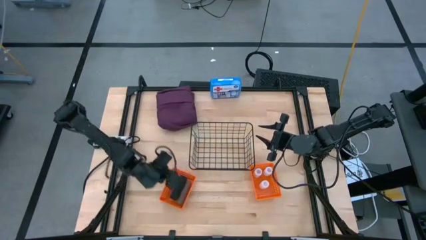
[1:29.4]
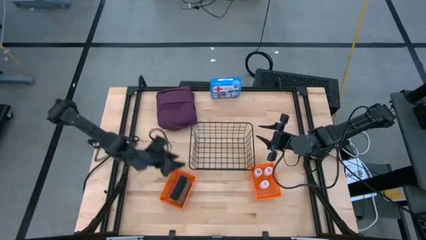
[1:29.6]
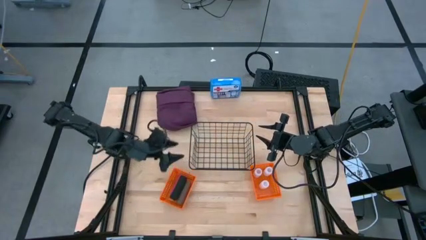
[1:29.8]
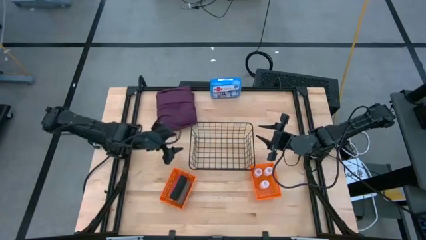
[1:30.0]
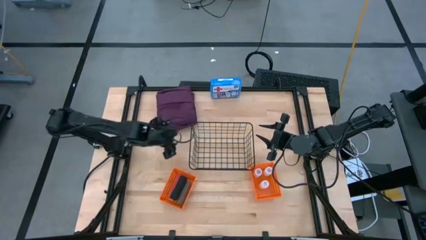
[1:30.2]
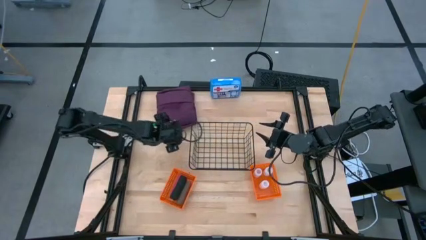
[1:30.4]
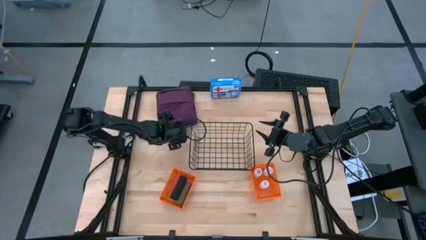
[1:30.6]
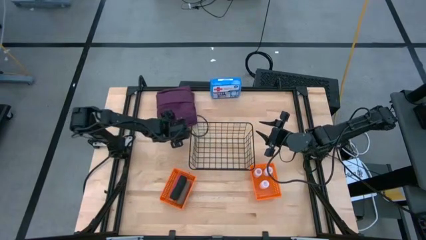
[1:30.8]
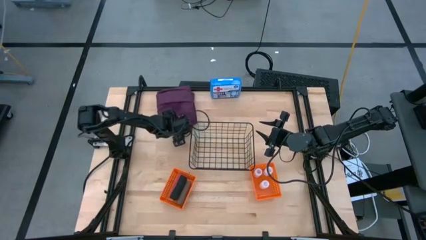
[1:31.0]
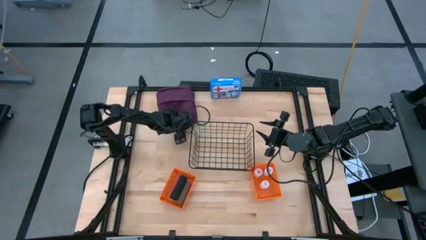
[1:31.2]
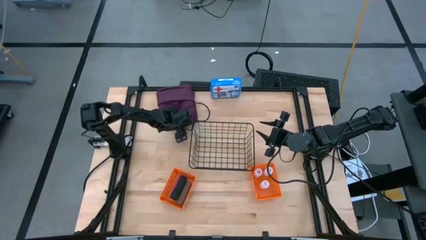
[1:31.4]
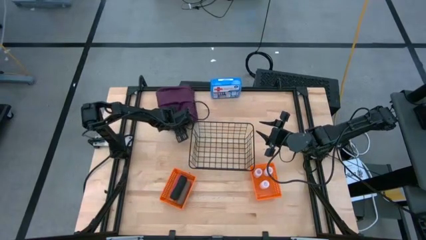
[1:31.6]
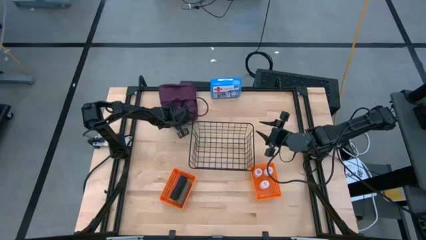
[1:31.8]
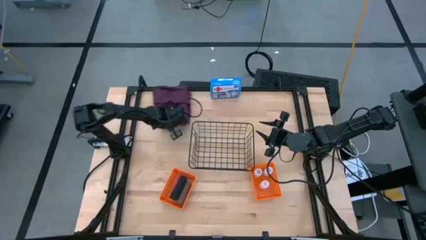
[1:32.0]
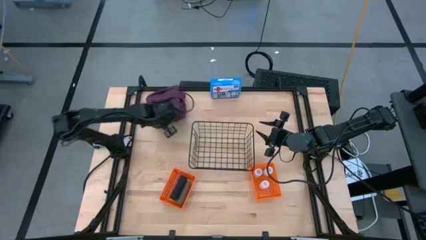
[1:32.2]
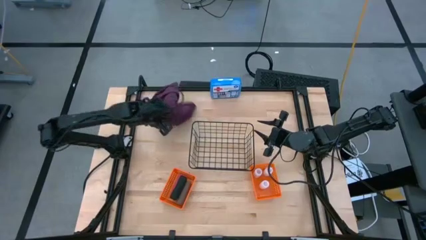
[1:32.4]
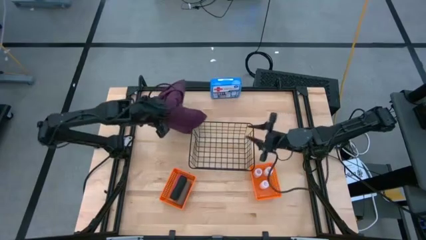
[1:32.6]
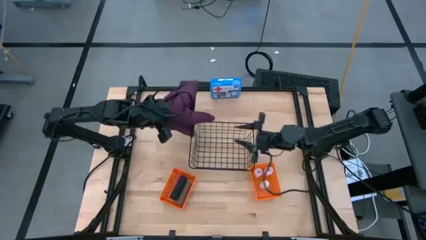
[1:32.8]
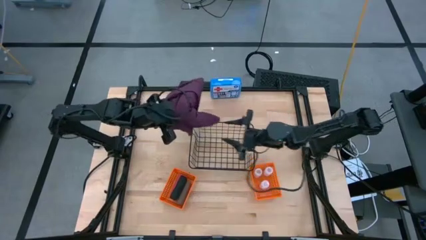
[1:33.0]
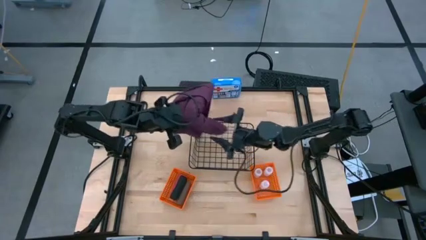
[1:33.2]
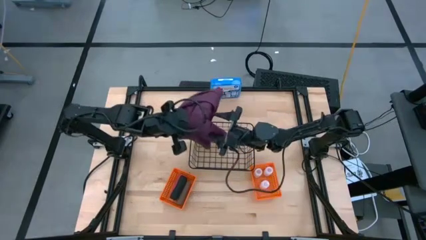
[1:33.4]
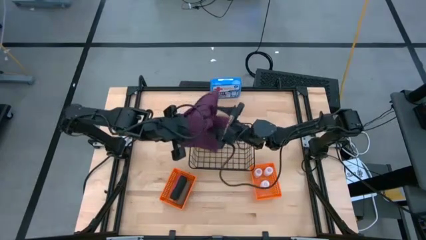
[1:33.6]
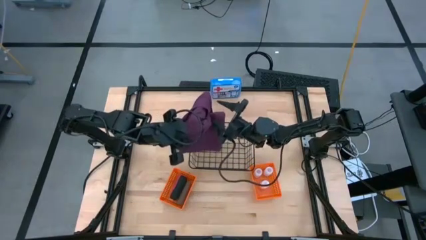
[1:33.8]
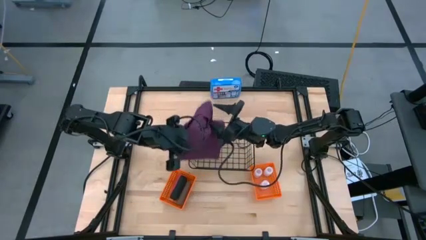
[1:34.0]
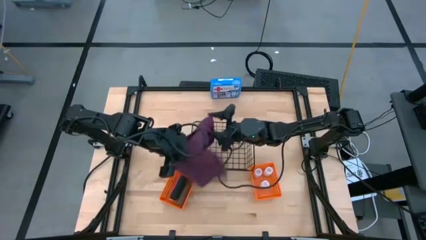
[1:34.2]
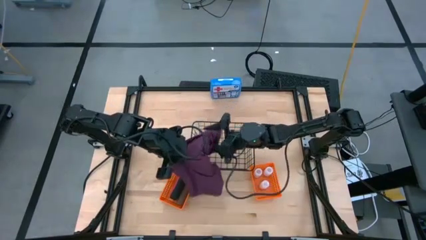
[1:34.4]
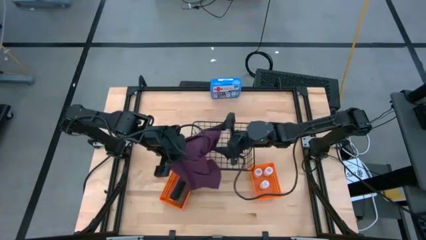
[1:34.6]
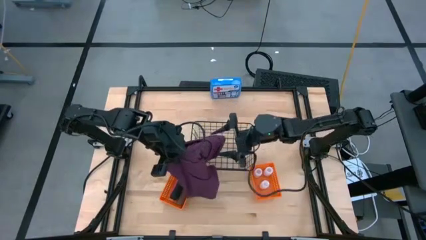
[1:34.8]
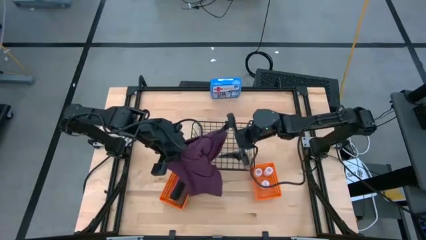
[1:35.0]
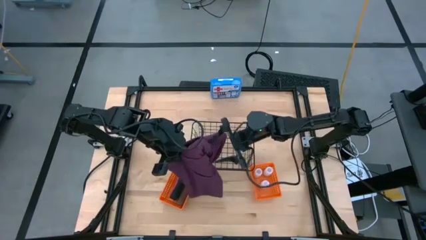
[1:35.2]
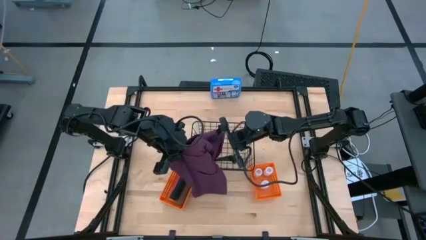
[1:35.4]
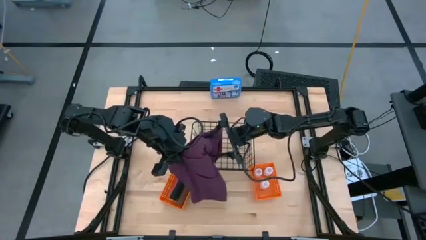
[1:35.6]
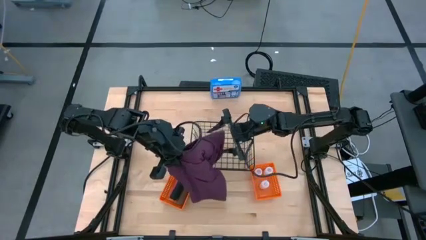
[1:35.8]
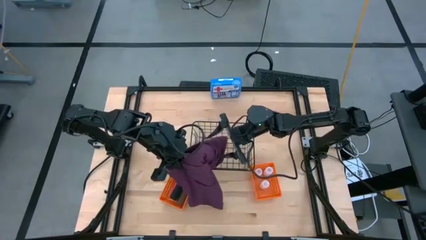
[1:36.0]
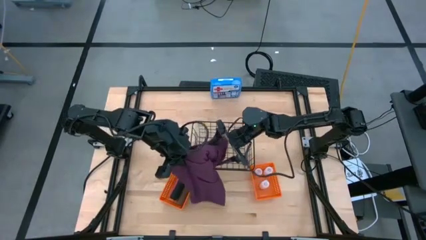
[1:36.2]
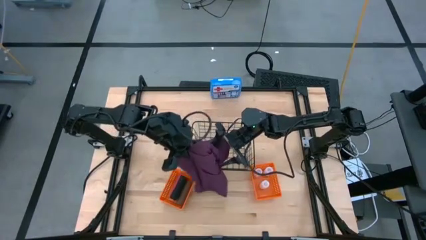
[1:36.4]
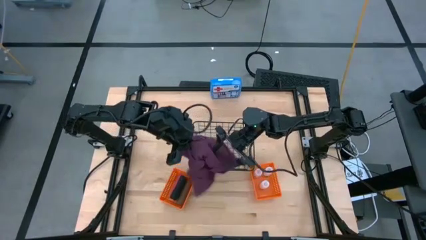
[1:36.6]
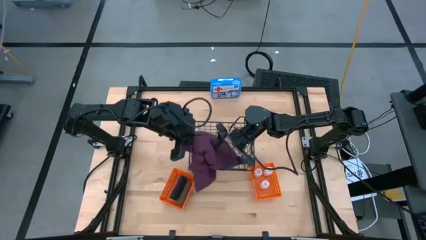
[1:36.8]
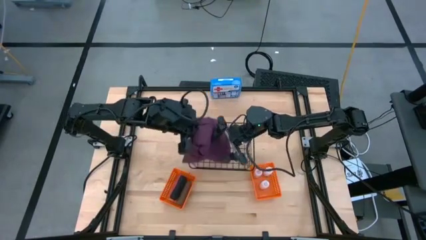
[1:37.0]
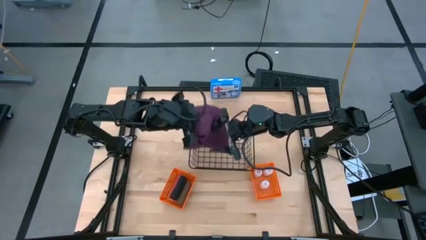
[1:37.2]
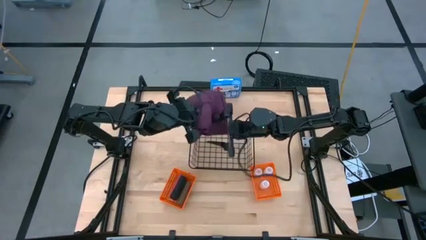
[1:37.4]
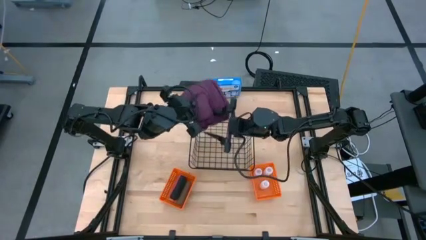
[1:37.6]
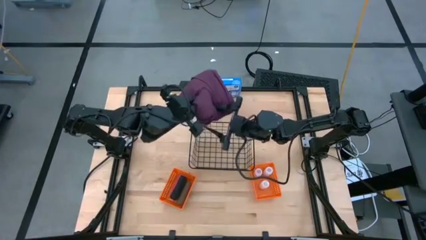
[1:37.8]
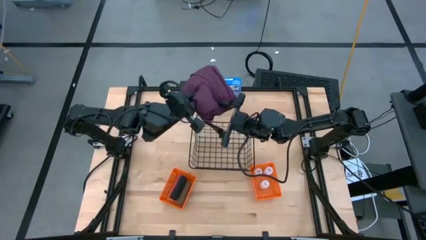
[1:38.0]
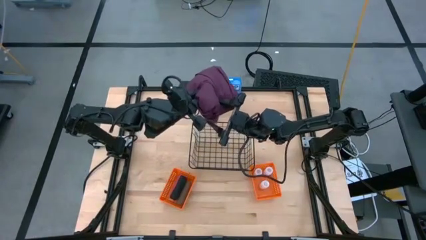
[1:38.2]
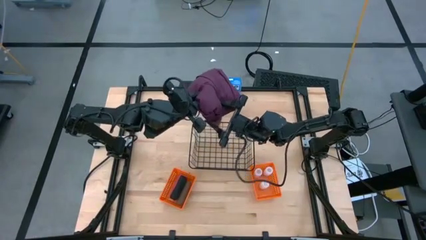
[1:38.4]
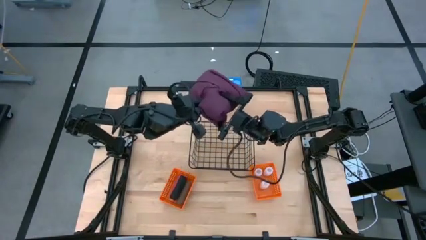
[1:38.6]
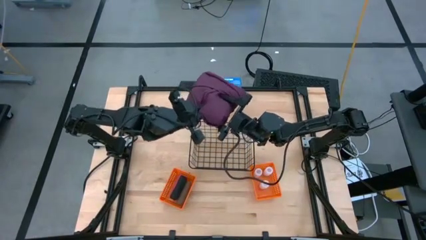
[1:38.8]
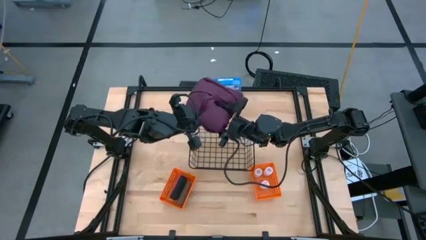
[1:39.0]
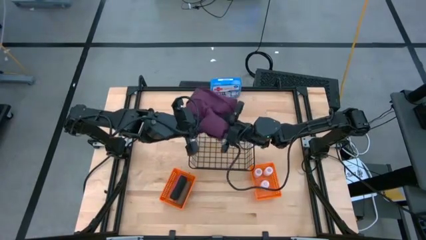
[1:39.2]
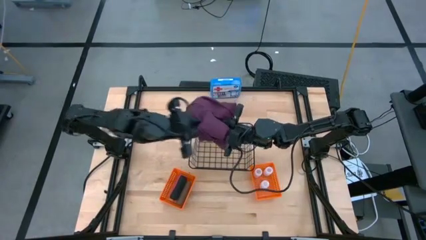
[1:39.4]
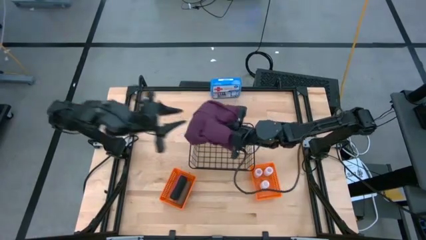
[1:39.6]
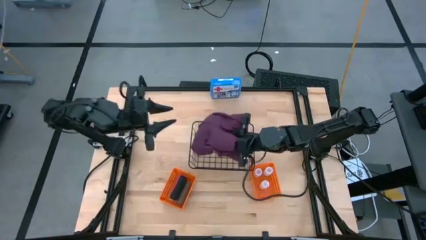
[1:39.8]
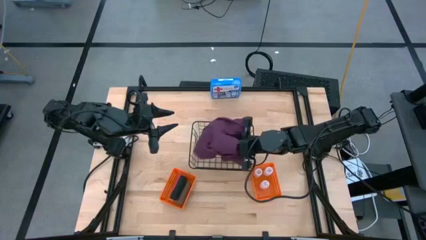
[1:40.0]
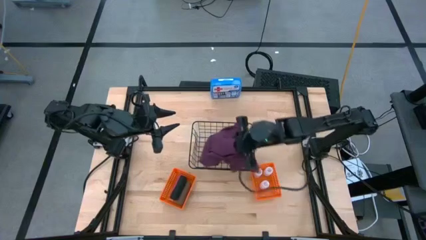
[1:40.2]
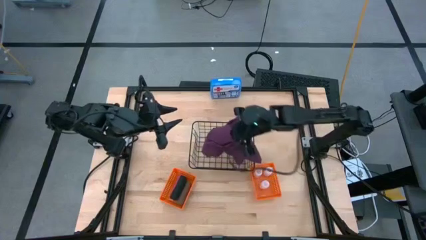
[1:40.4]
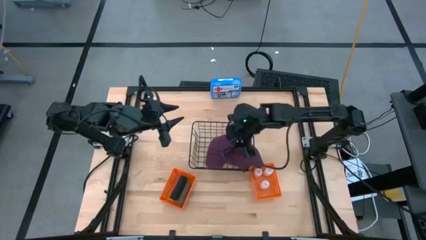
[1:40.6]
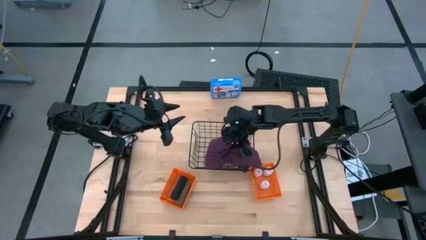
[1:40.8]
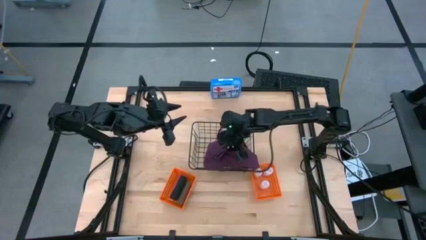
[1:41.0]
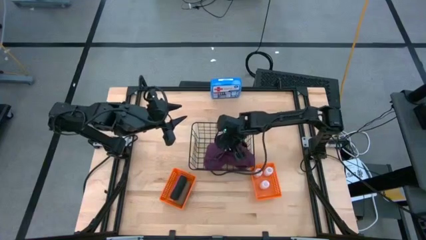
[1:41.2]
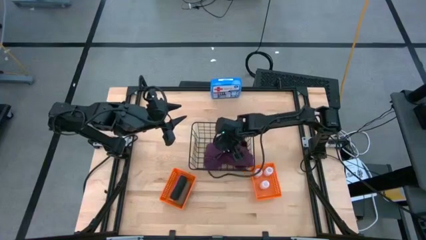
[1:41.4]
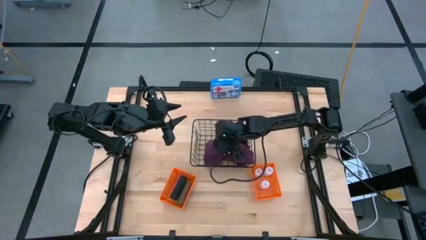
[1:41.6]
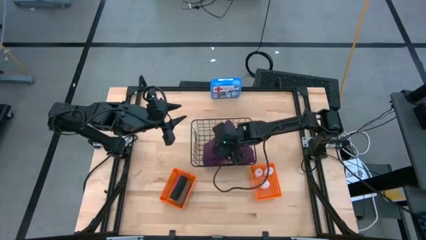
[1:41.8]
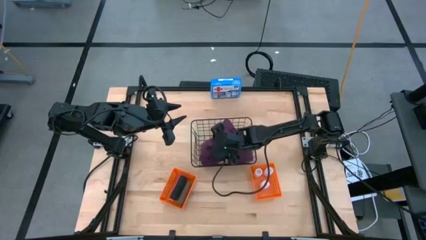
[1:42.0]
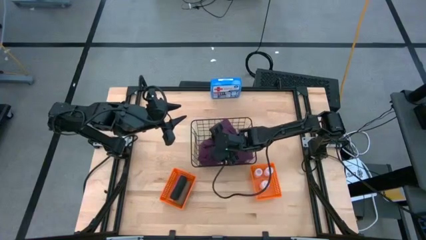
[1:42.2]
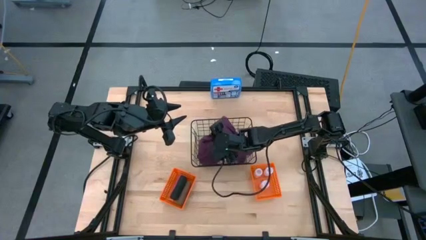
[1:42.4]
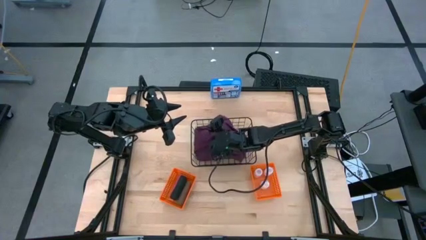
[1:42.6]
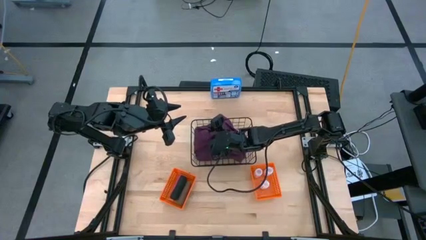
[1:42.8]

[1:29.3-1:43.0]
Task: Pick & Place Medicine items
Put the violet patient gown into the black wire basket

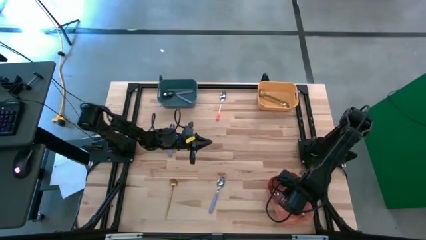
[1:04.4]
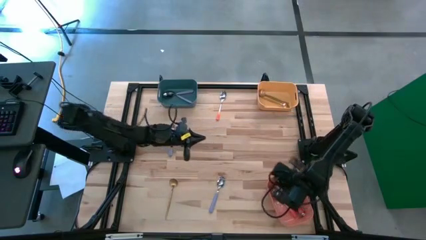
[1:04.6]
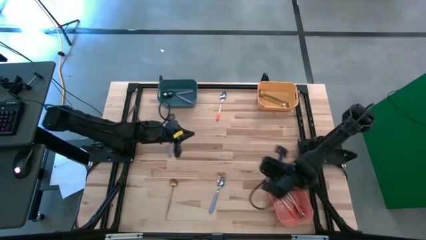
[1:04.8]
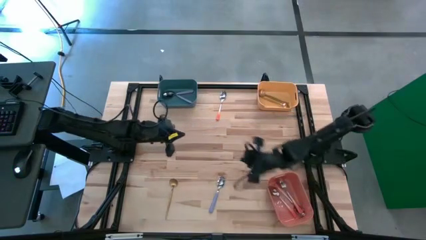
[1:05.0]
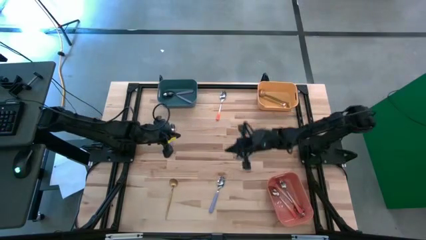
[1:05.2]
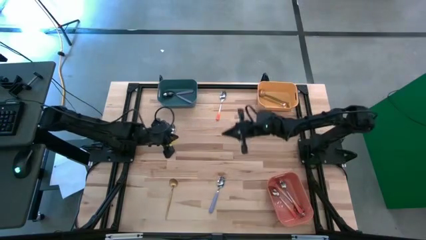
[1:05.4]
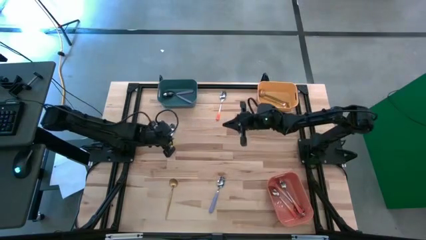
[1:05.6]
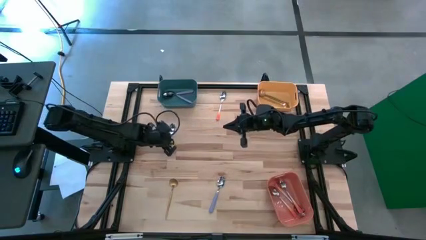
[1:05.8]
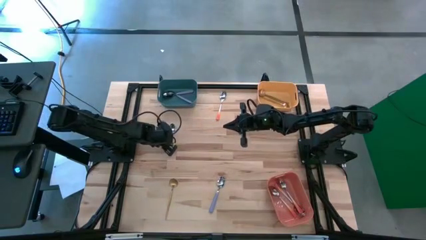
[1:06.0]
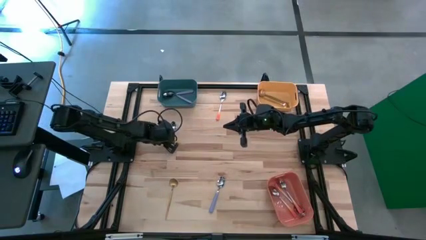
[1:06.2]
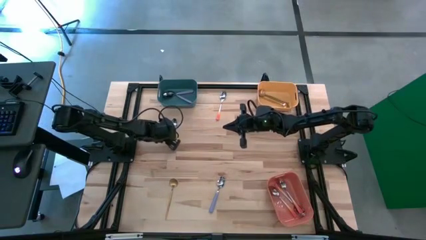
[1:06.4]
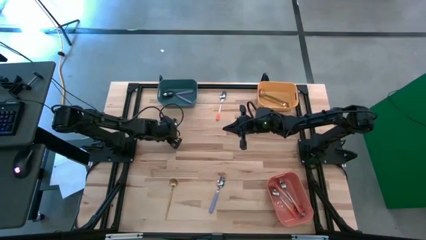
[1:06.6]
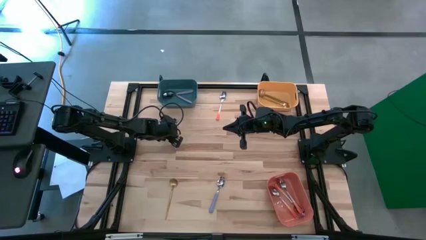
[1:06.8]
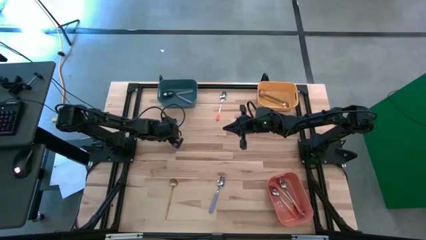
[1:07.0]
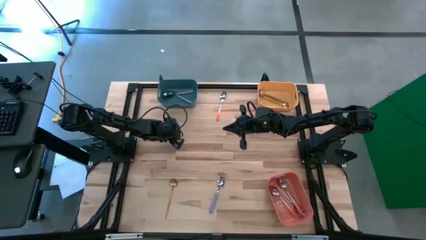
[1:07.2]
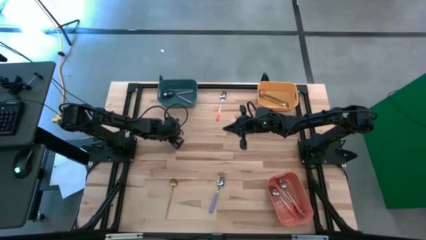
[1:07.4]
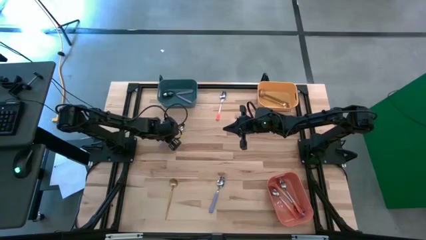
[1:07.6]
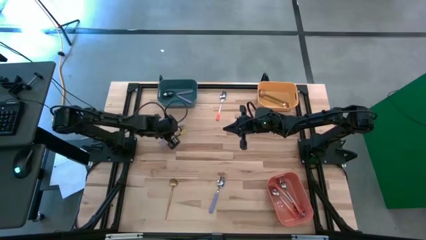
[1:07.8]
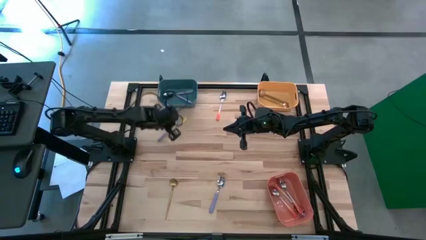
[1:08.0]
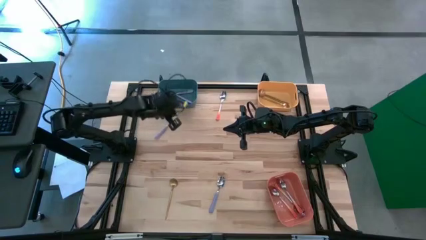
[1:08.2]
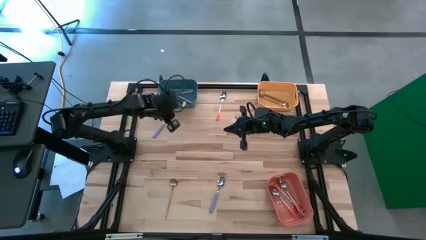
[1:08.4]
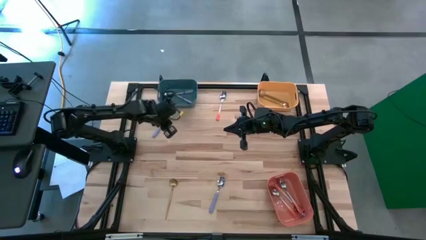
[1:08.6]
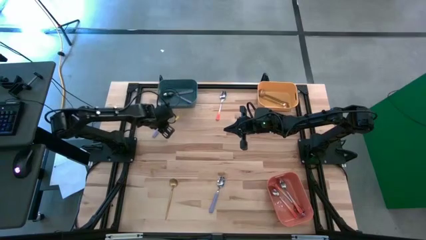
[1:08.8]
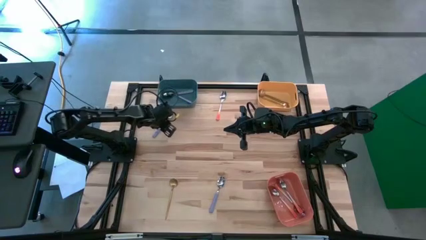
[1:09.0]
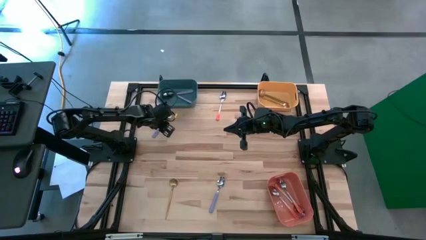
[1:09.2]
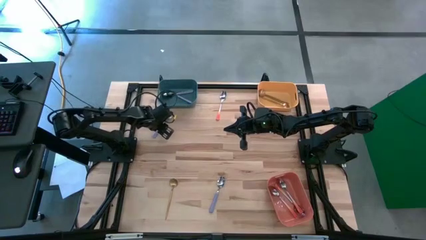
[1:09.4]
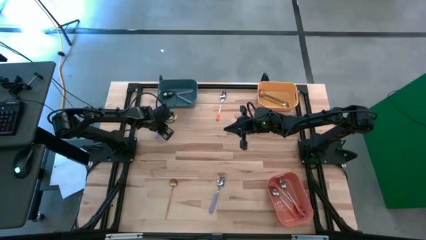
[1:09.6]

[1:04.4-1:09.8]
Task: Sort silverware by color (type)
Put the left violet spoon into the dark green bin
